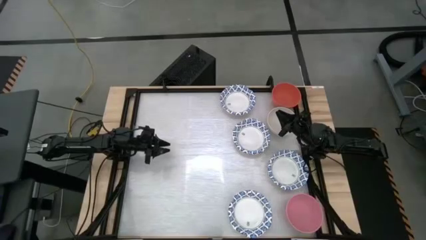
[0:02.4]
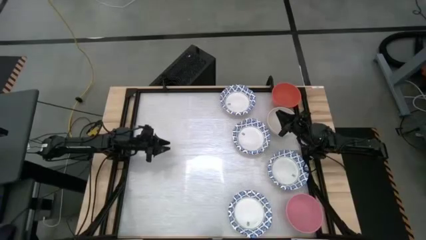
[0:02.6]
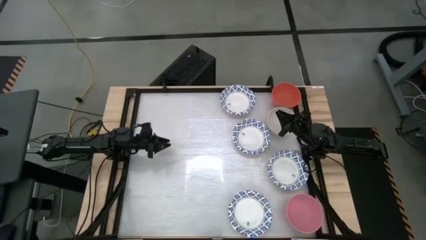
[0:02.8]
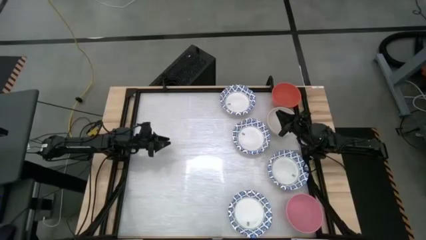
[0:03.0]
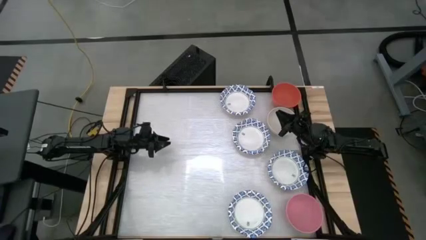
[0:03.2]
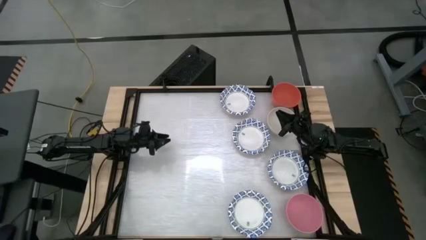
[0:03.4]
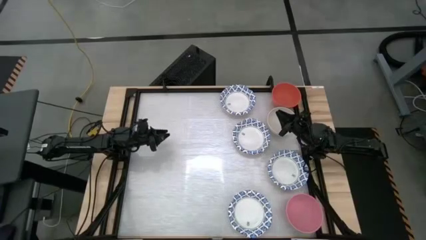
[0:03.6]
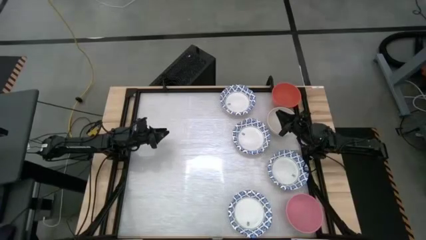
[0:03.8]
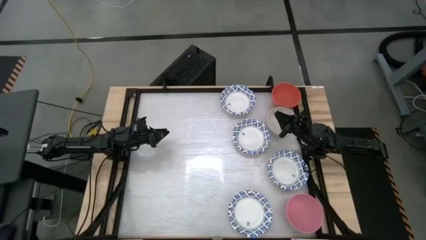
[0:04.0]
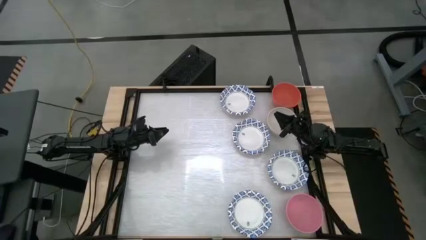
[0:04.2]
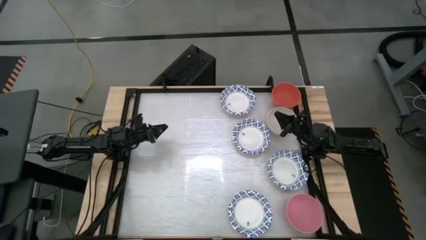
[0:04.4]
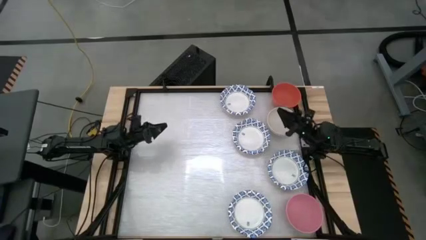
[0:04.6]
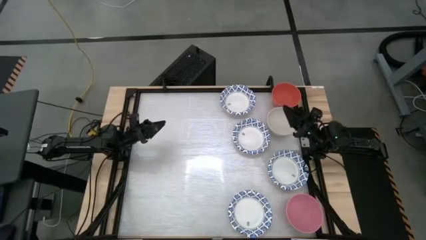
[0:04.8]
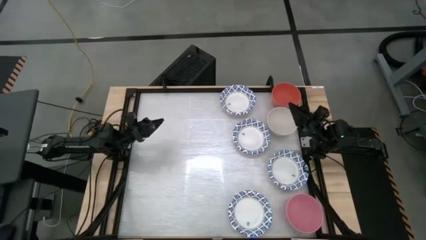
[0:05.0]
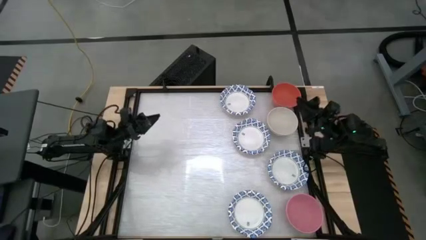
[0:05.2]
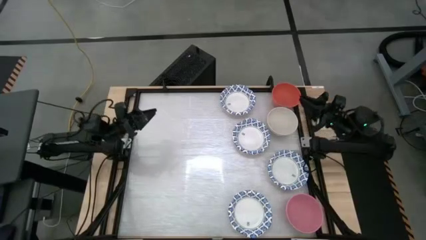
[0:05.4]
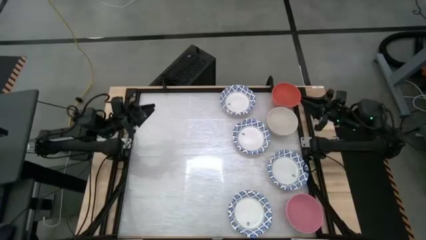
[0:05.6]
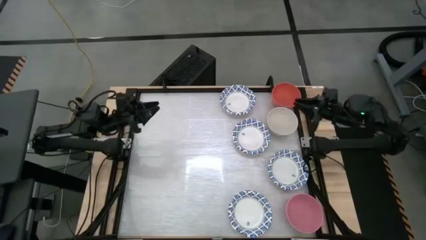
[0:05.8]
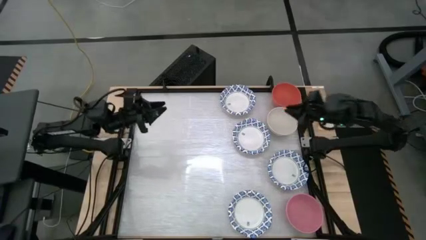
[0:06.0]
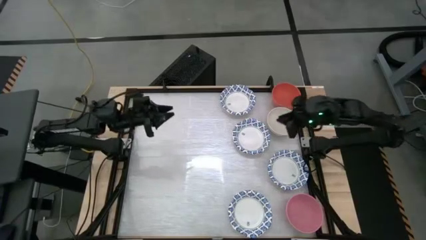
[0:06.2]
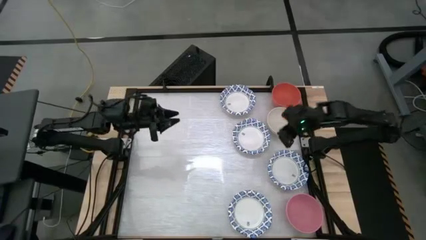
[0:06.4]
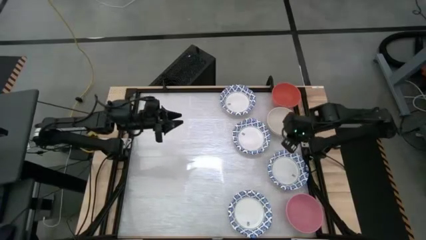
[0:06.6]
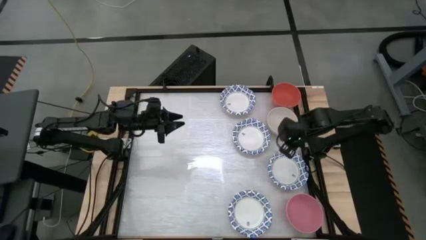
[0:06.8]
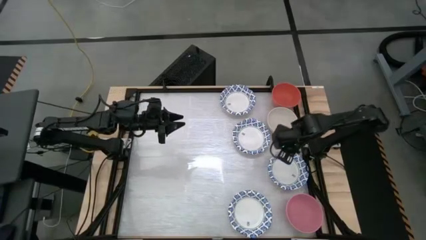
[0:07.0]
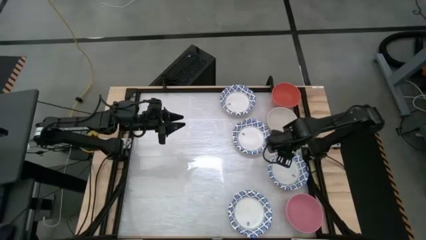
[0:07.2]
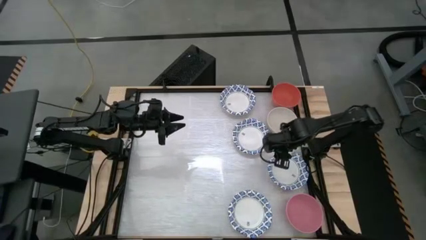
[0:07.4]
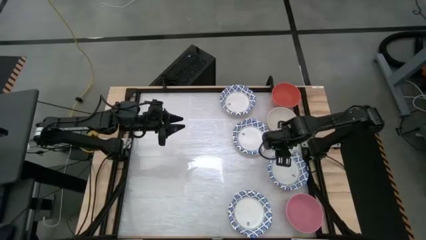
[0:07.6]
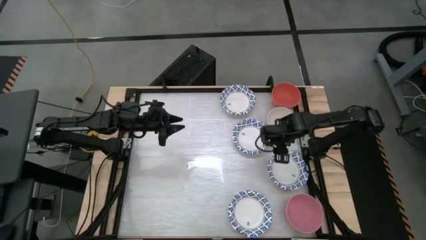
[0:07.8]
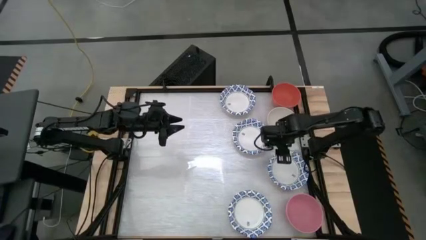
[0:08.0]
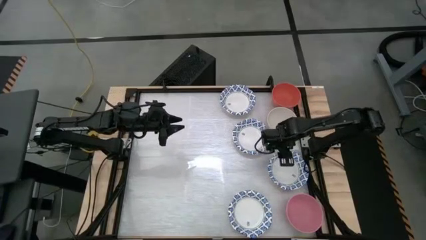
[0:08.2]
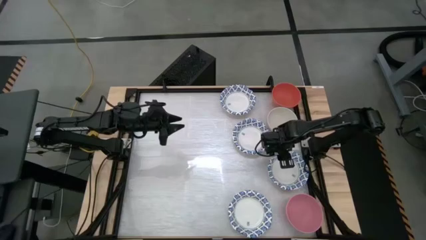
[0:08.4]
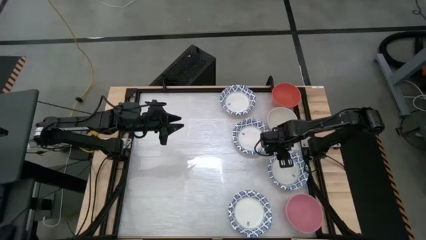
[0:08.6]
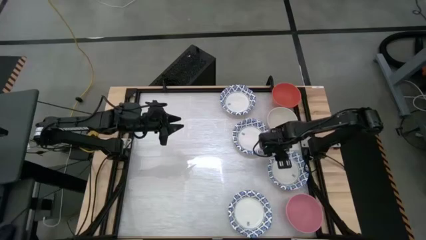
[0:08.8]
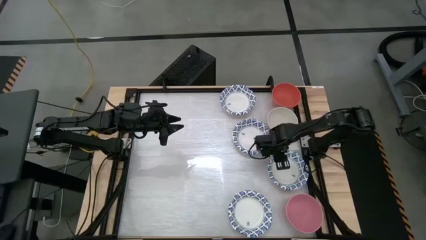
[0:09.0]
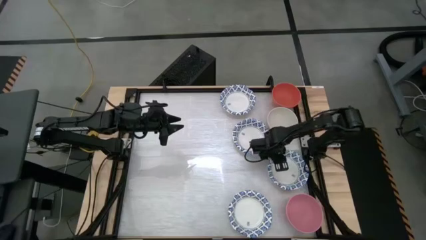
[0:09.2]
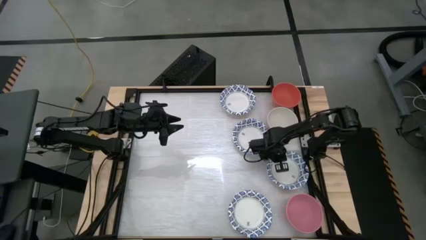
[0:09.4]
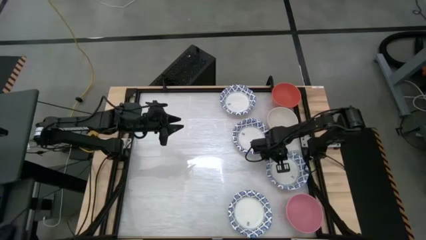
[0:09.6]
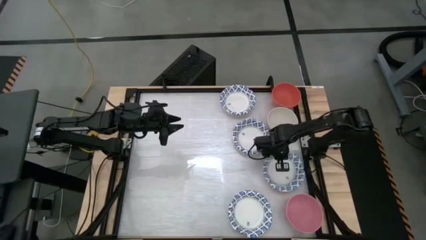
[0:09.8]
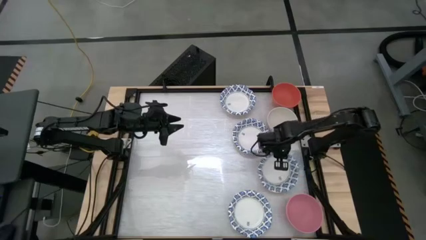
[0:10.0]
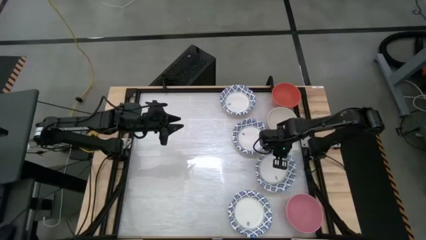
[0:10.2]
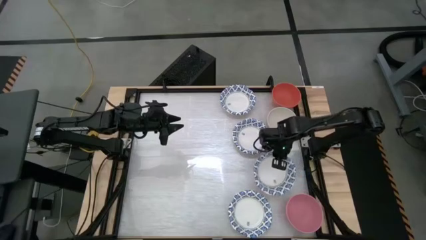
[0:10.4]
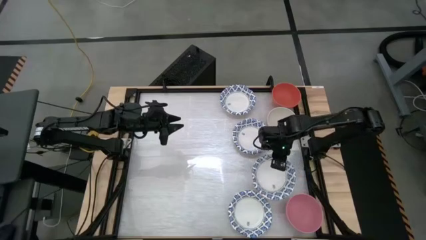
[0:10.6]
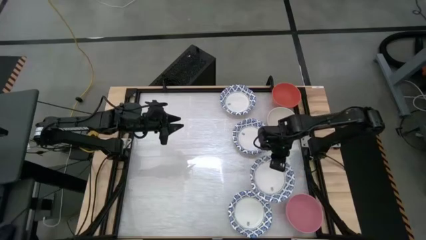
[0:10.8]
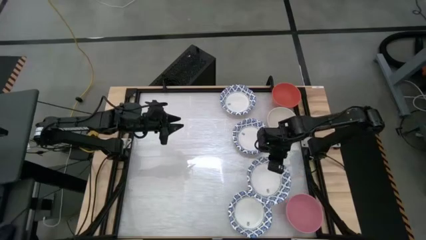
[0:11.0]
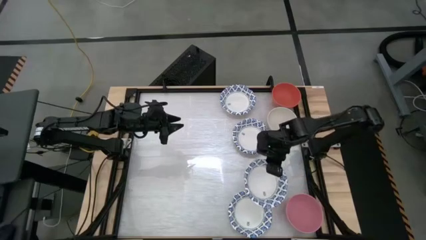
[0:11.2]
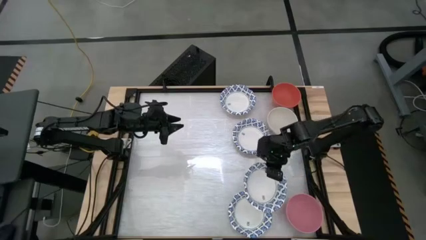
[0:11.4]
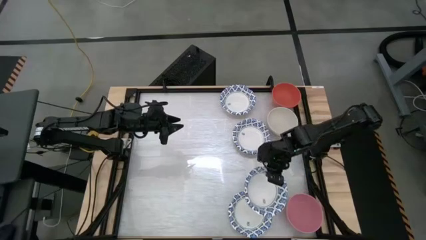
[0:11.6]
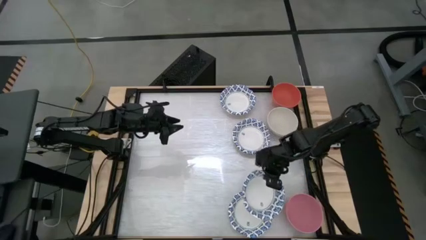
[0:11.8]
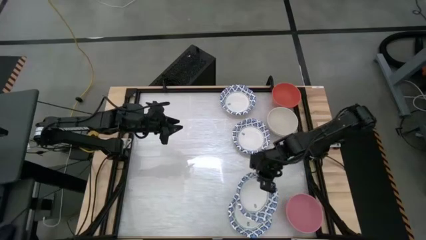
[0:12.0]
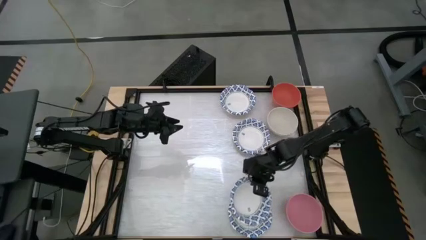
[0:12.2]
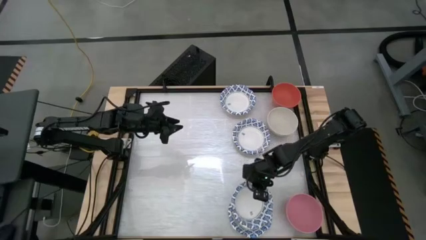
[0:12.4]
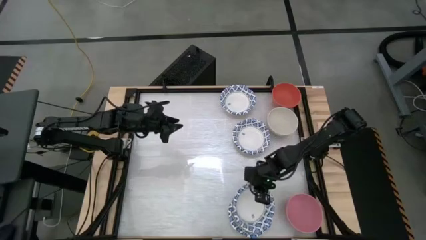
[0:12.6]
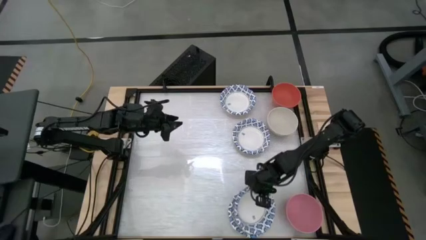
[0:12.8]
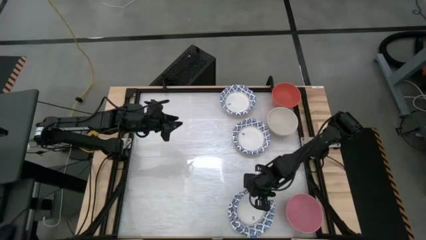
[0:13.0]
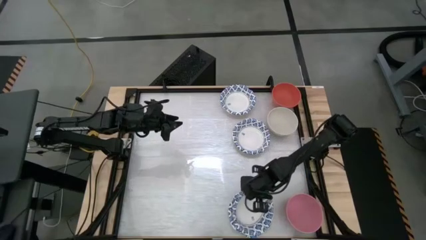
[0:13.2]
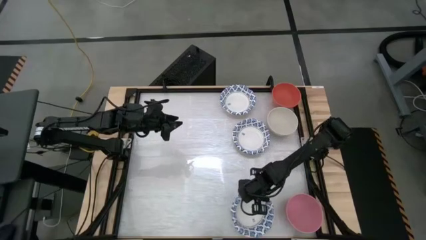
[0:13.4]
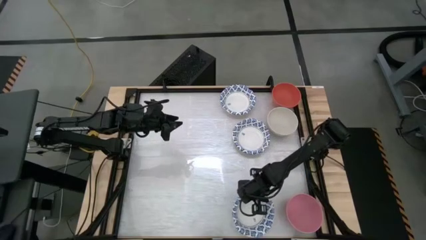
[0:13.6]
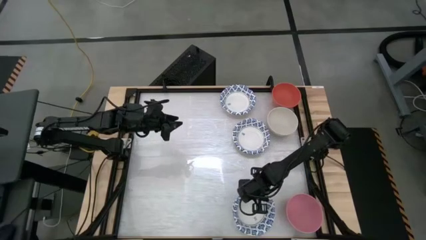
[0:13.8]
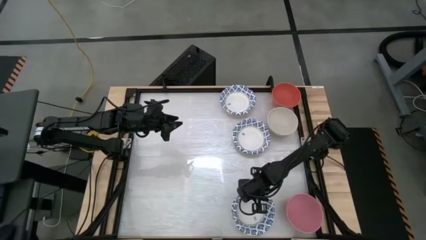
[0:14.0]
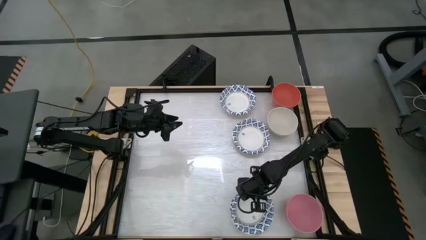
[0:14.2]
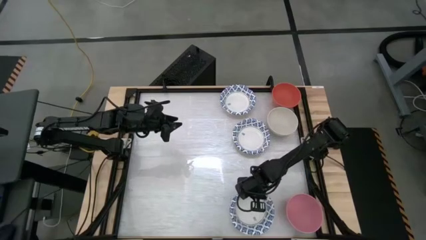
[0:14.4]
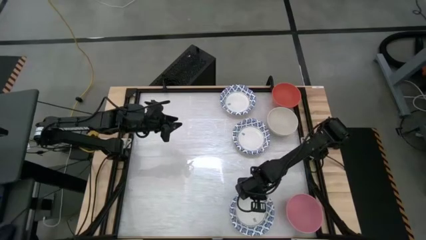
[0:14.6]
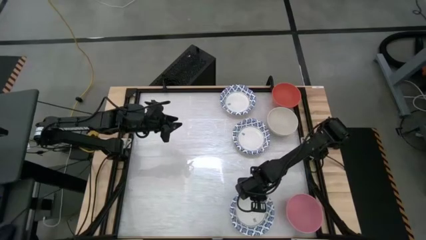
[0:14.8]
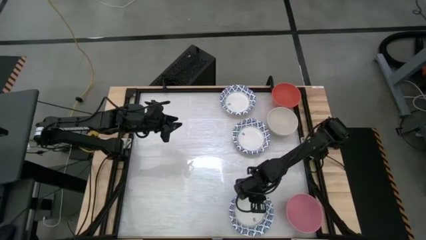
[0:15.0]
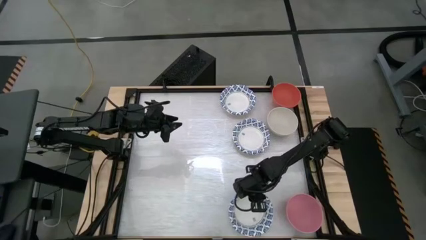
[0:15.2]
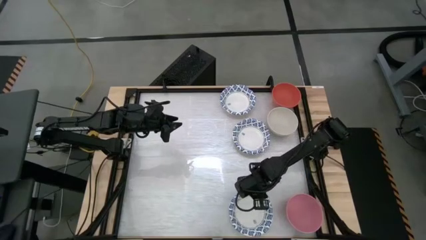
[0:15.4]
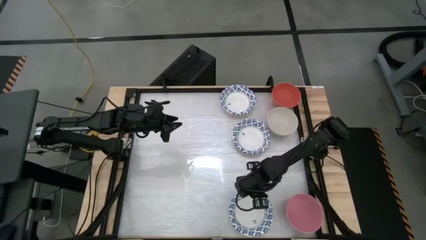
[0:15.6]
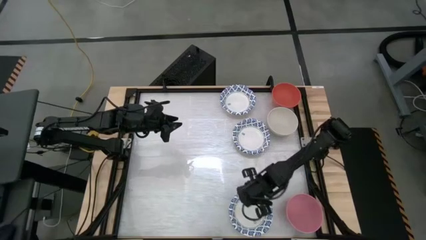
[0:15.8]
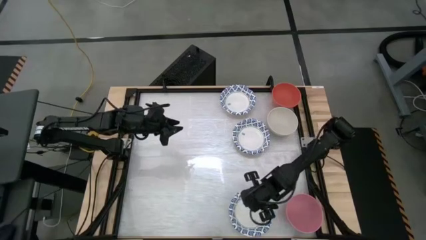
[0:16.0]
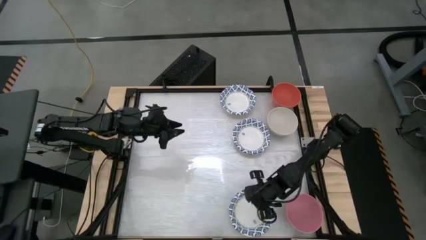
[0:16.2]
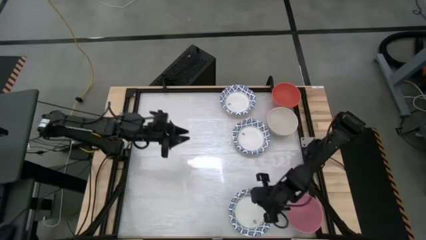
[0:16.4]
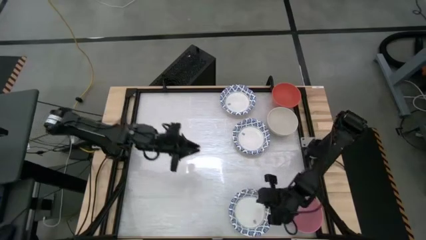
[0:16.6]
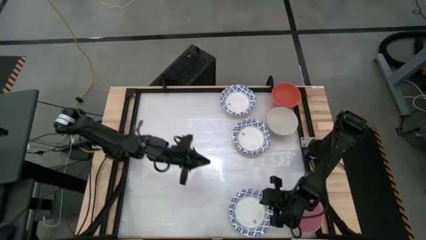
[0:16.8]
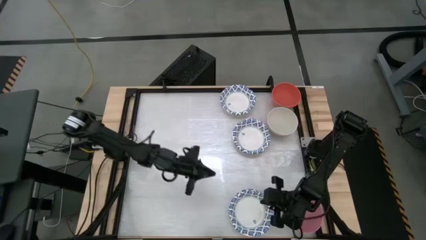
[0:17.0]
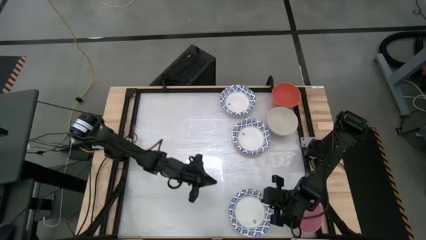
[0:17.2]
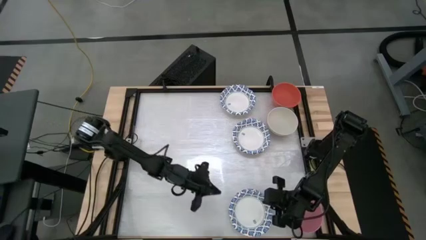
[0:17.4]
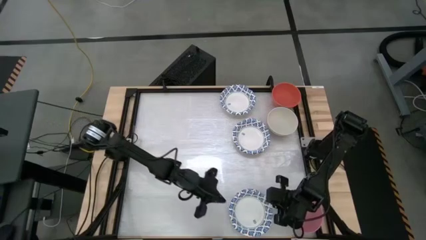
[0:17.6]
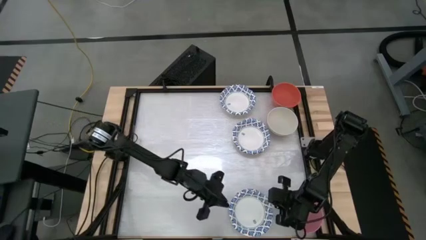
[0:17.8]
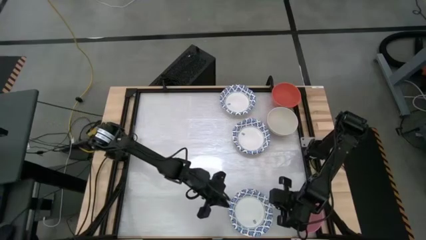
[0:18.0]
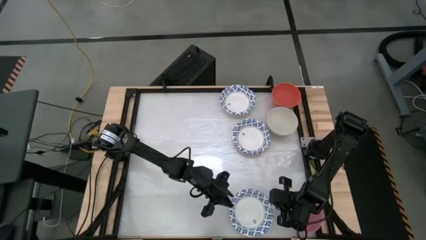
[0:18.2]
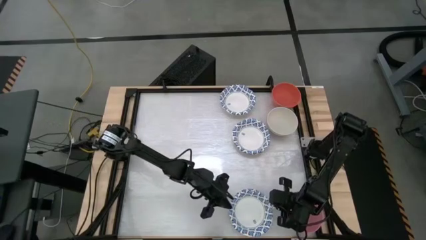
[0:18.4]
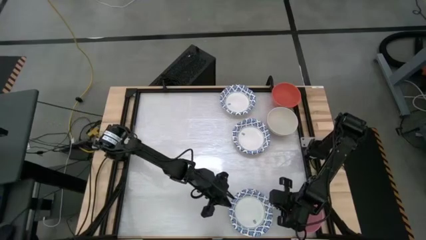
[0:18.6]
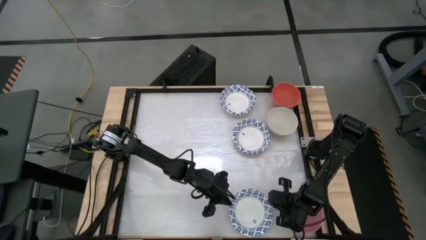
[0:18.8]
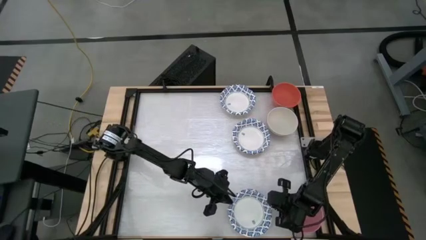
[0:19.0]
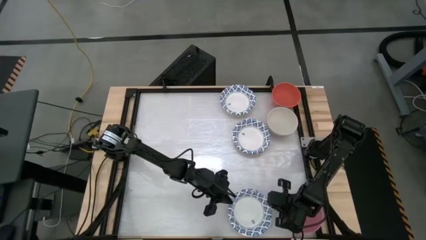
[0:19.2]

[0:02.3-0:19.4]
Stack the middle right white blue patterned bowl on top of the bottom left white blue patterned bowls
